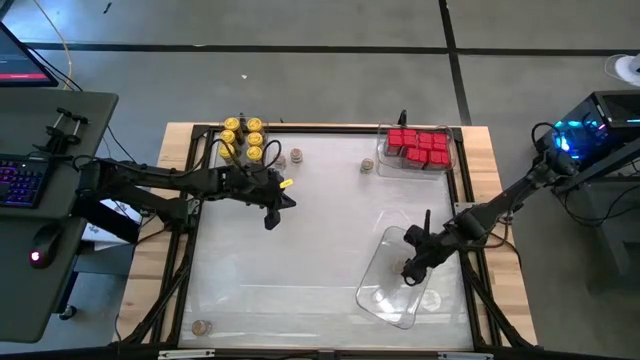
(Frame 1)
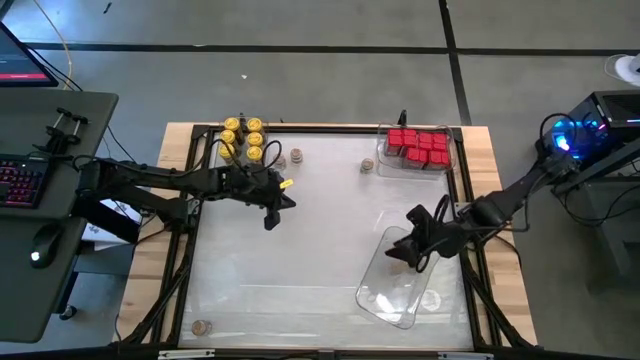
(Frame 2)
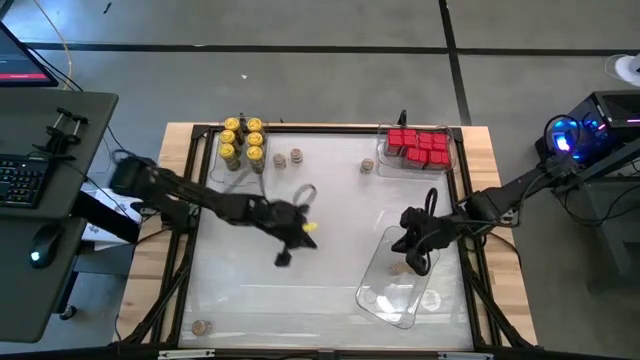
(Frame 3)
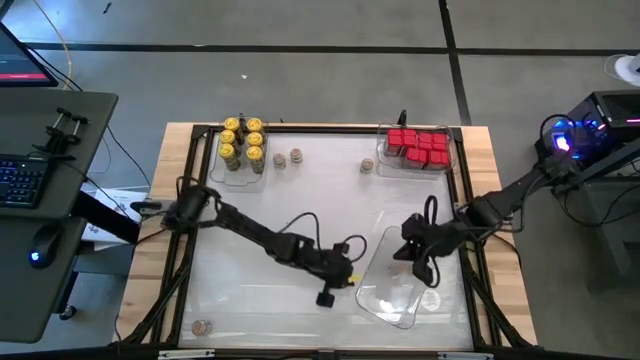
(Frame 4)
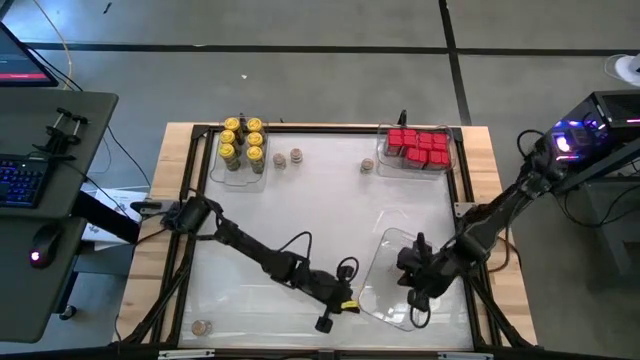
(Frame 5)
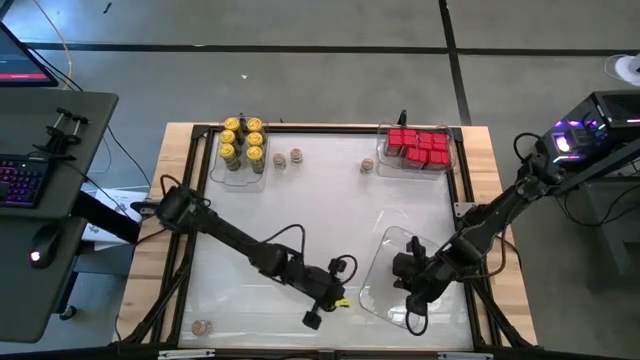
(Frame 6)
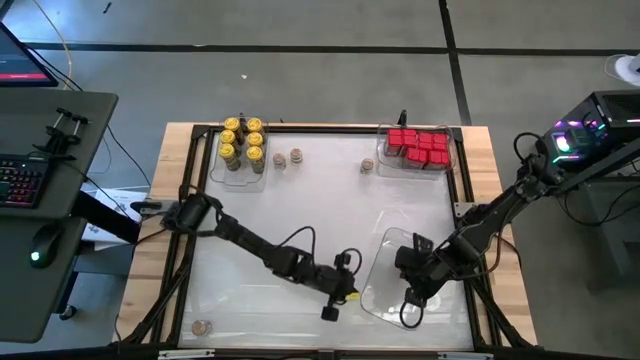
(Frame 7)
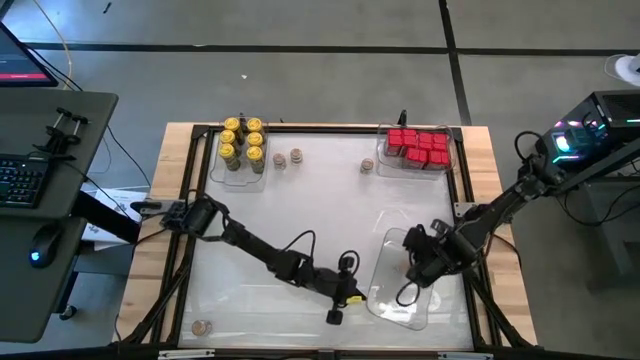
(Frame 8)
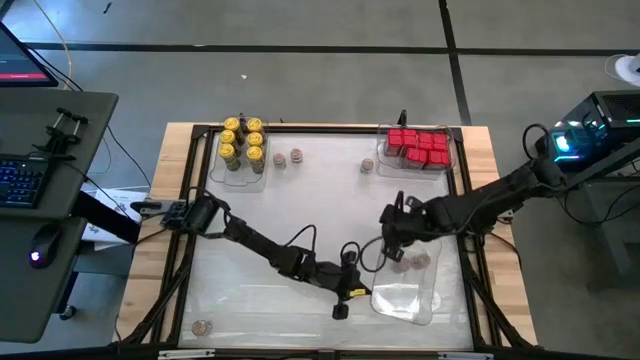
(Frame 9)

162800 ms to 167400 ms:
Task: Sort spices by type
Adjust the bottom transparent bin

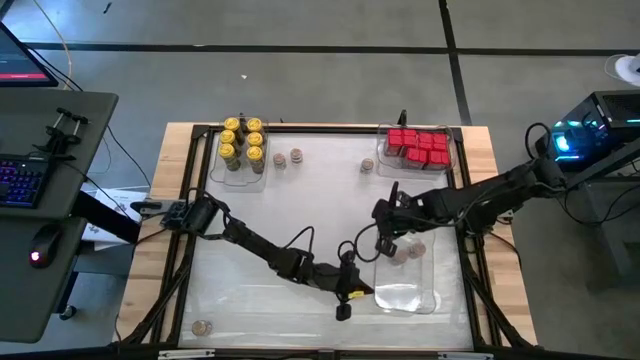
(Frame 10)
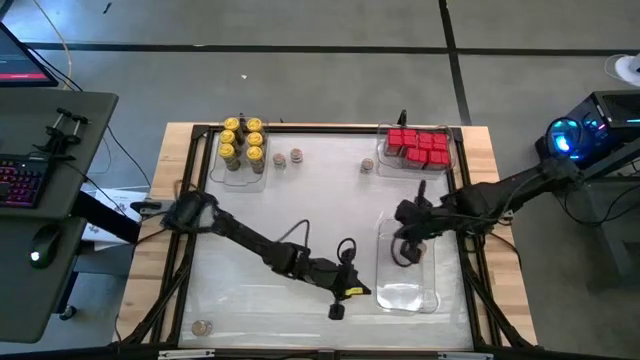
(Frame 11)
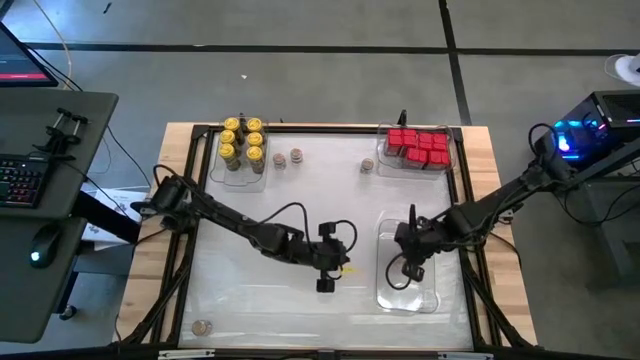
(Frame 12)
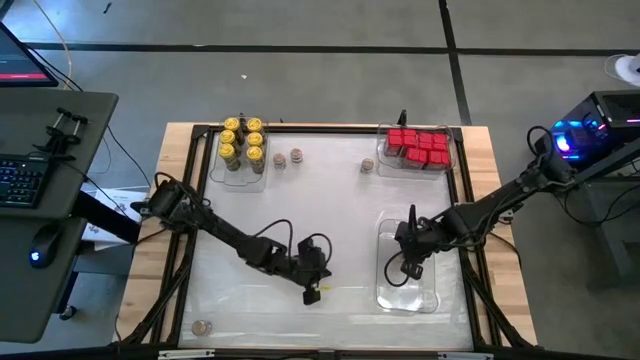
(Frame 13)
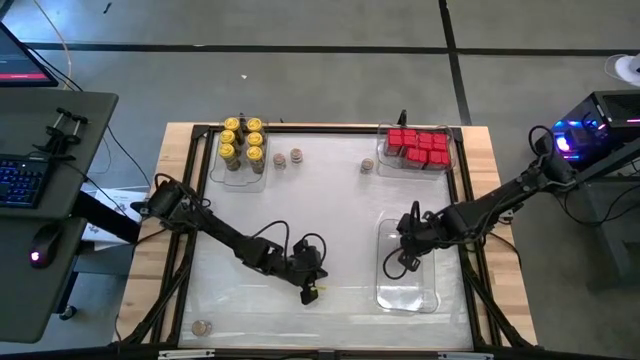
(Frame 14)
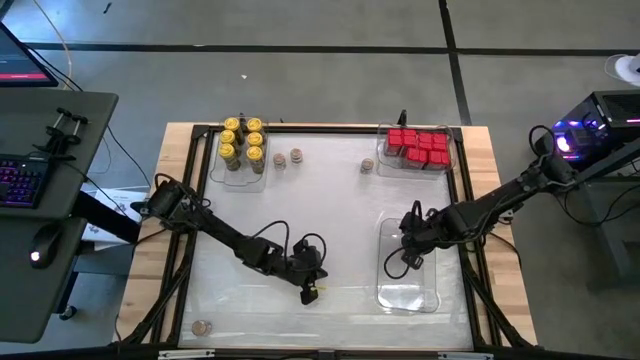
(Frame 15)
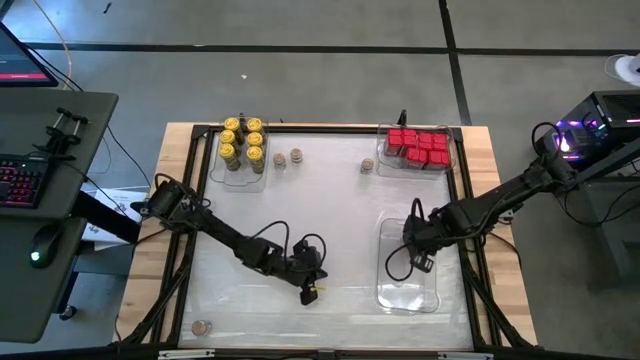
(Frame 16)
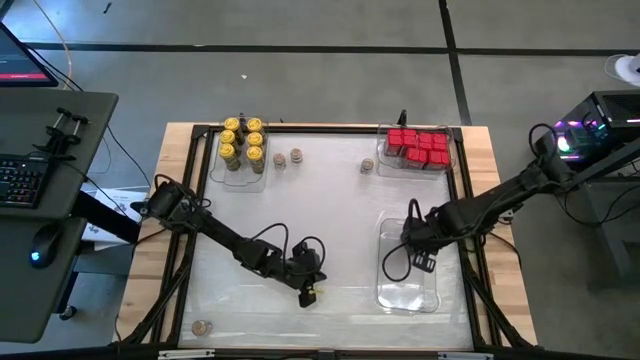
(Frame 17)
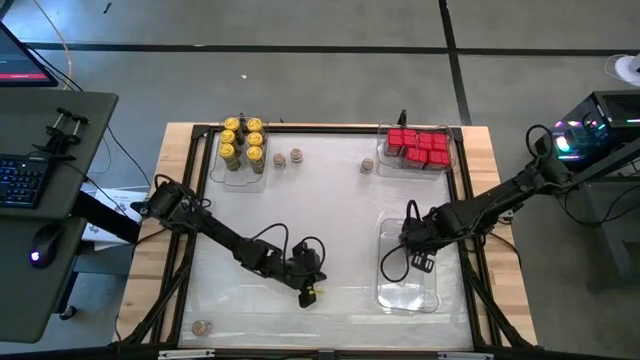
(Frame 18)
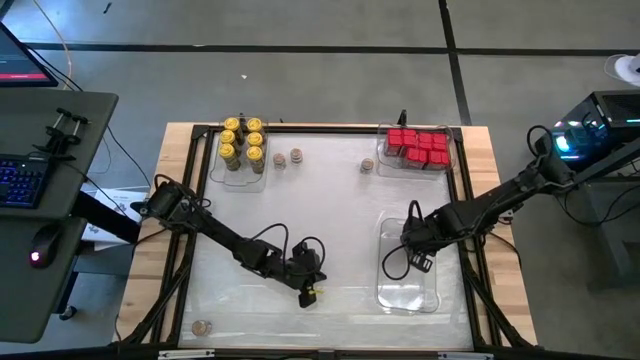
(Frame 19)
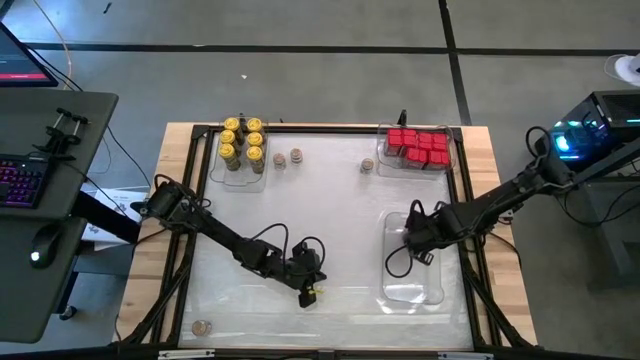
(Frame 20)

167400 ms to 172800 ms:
Adjust the brown seasoning bottles in the bottom transparent bin

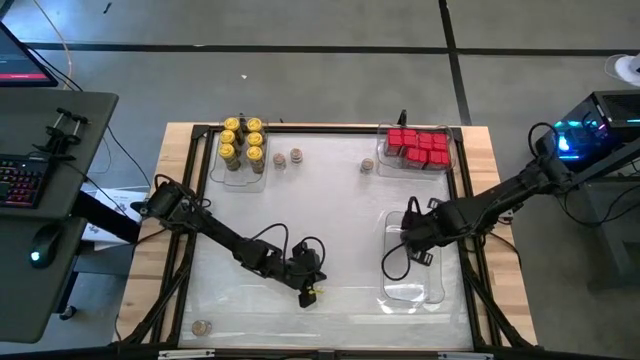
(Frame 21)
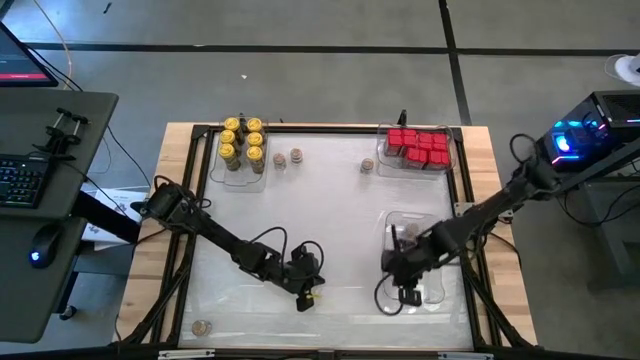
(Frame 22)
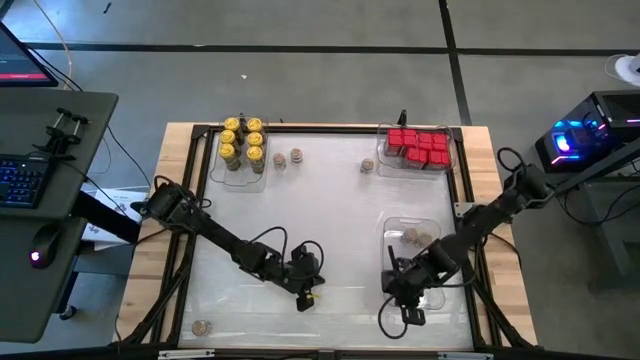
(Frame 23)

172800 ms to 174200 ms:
Adjust the bottom transparent bin

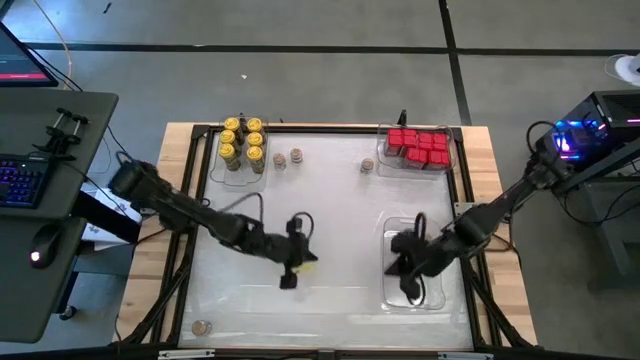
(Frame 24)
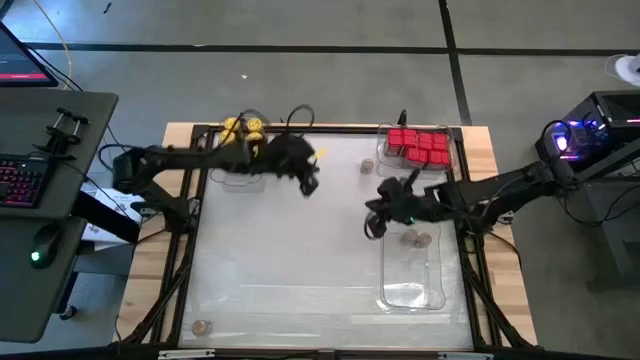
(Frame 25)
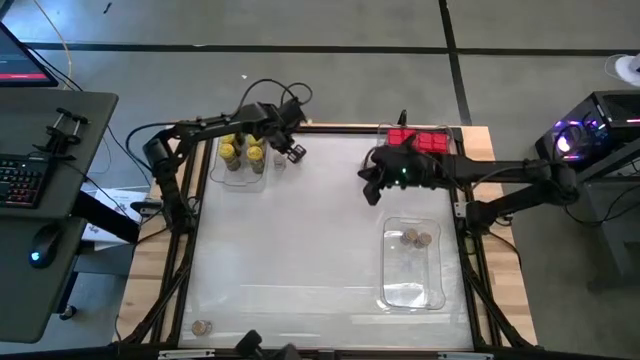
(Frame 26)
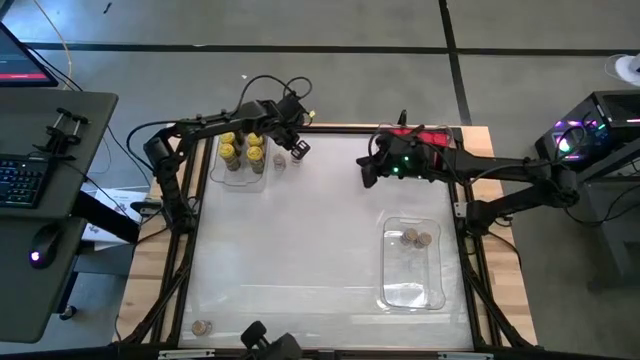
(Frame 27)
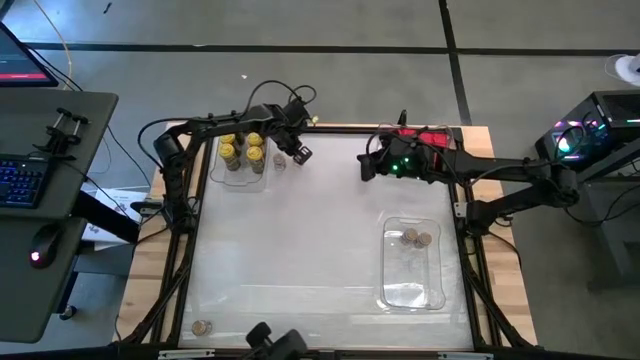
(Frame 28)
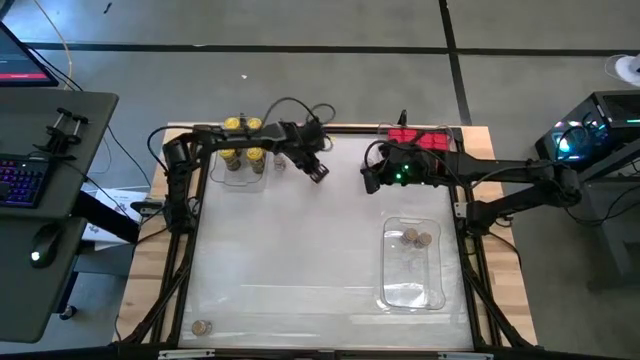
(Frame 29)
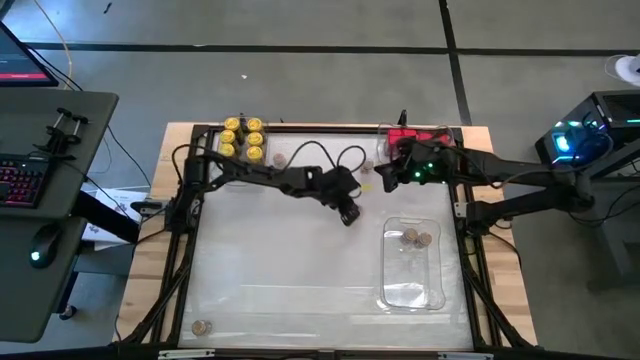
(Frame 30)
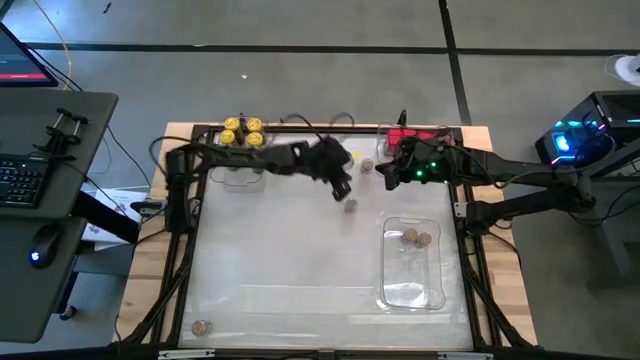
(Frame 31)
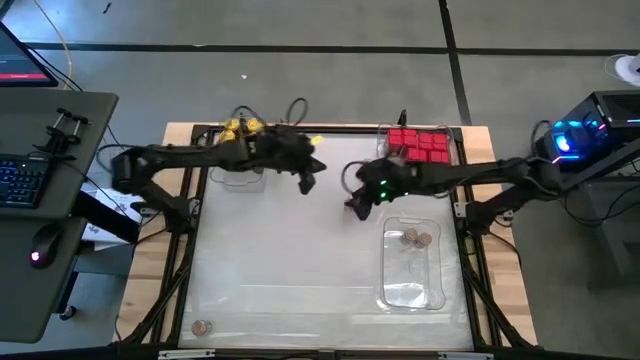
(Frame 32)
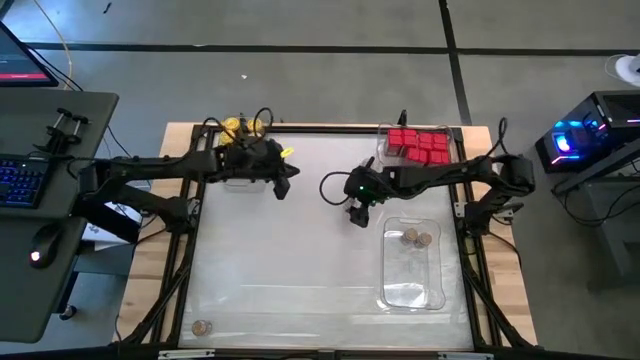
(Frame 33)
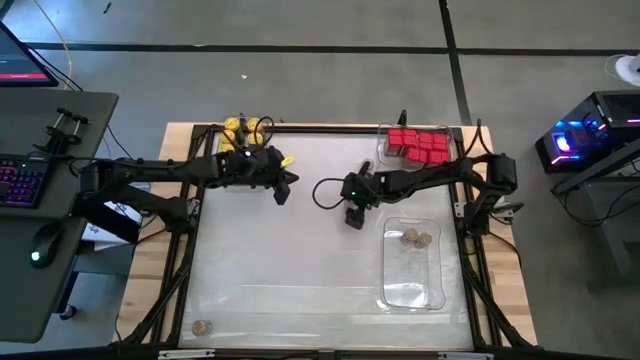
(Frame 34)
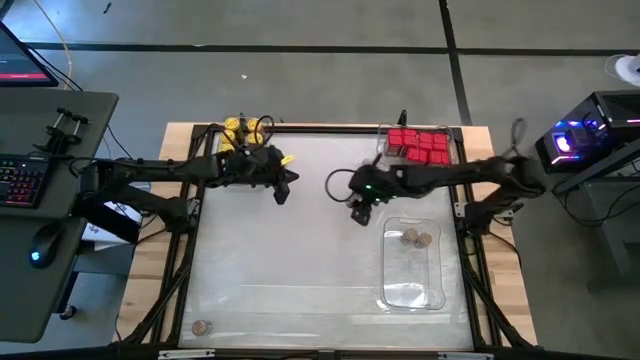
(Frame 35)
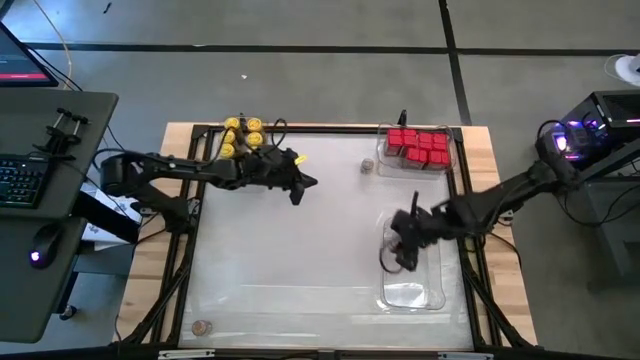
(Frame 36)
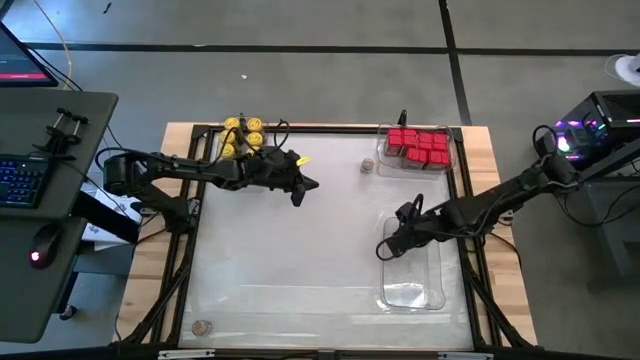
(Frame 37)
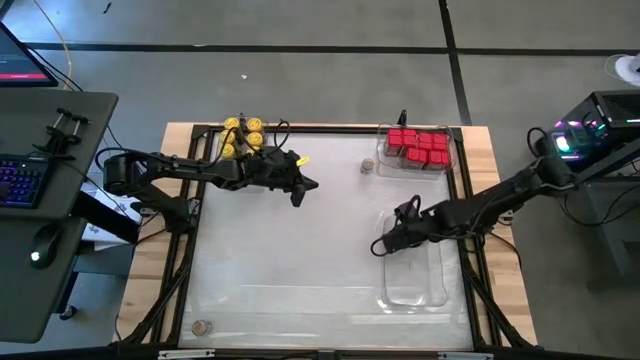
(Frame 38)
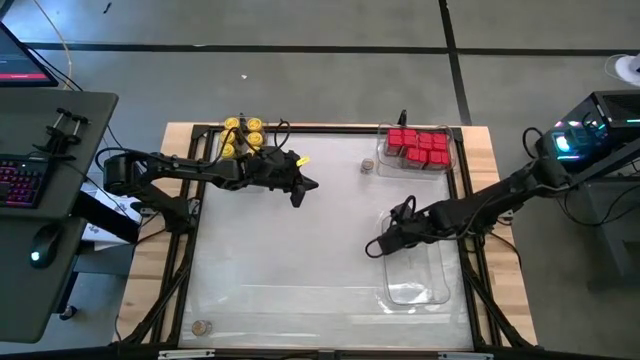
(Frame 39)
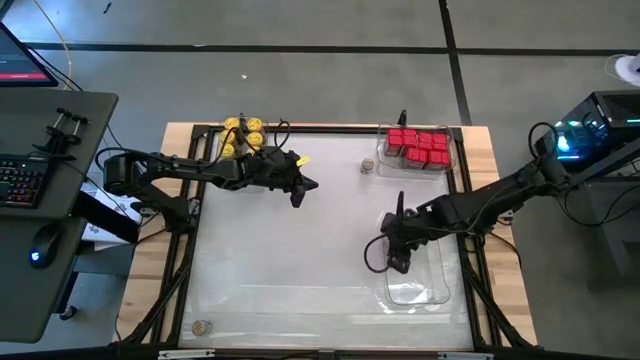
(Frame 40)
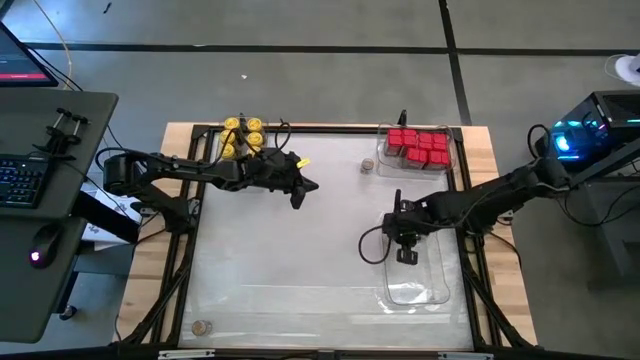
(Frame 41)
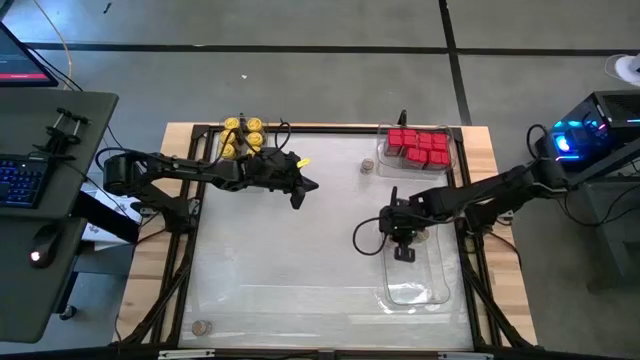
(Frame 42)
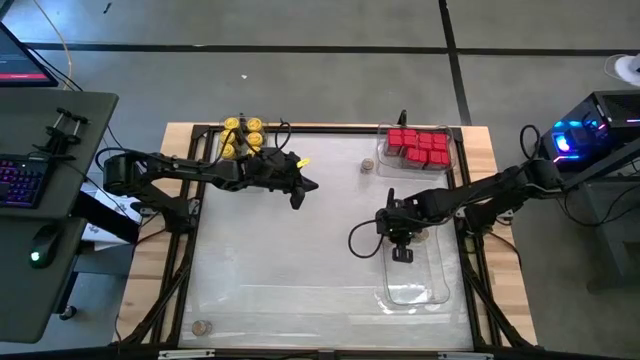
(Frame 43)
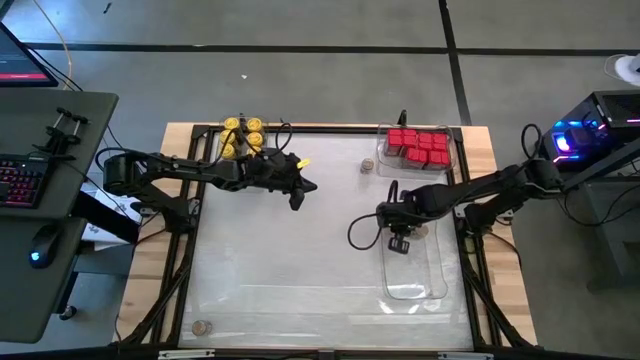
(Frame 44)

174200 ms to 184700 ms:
Put the brown seasoning bottle into the bottom transparent bin
